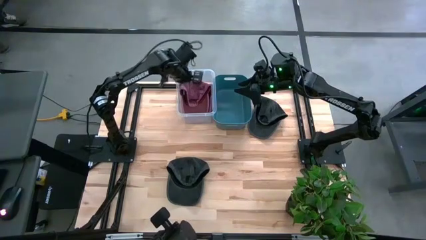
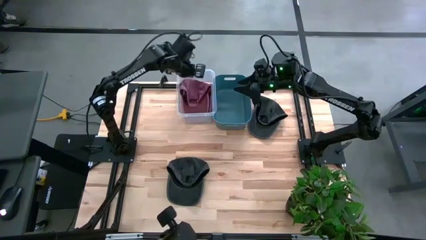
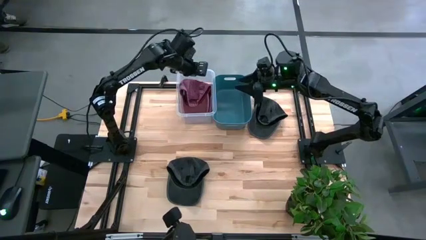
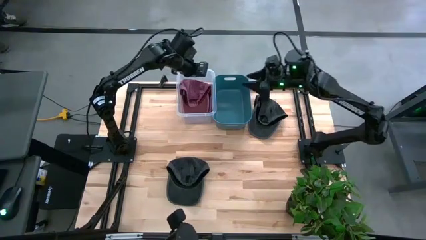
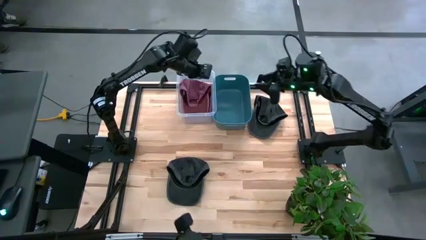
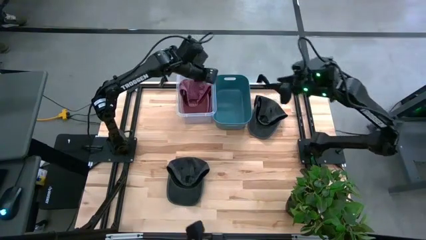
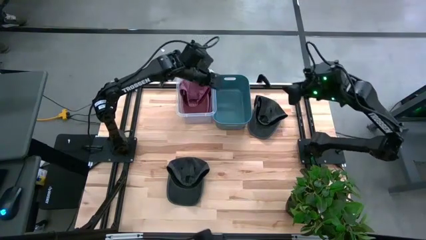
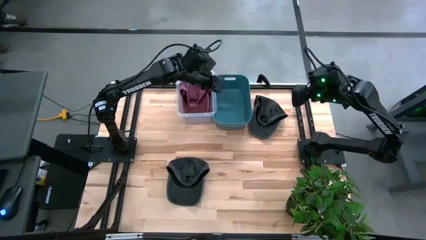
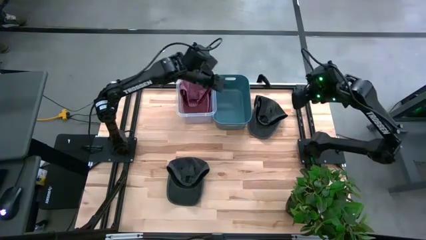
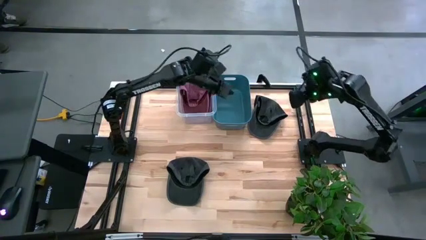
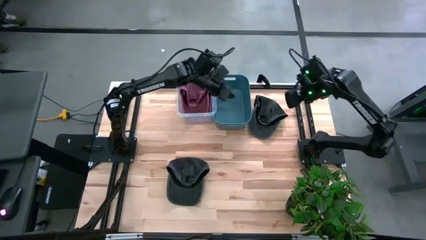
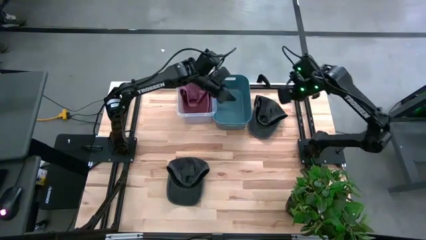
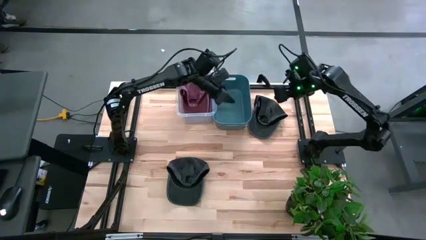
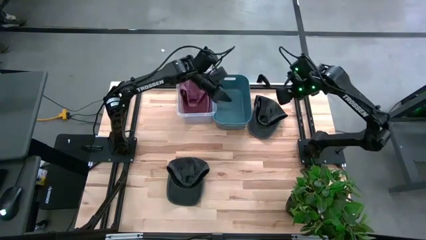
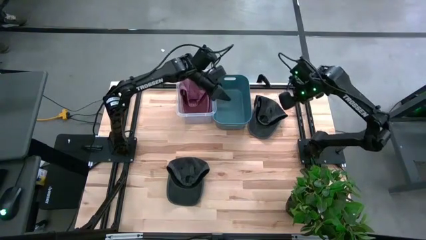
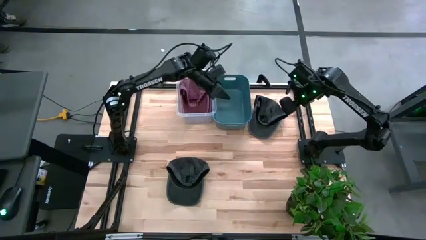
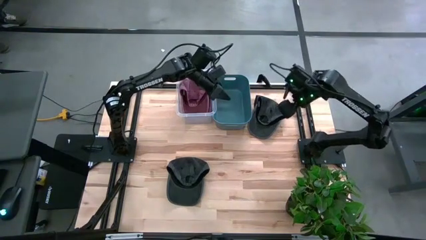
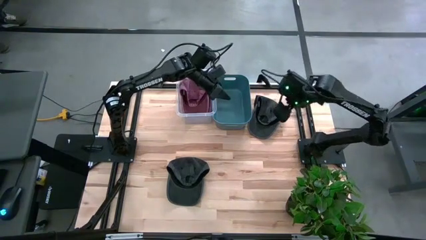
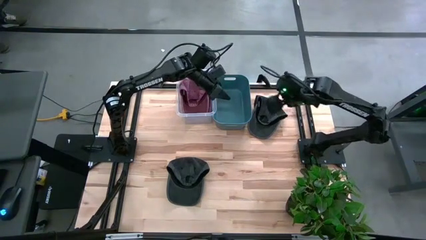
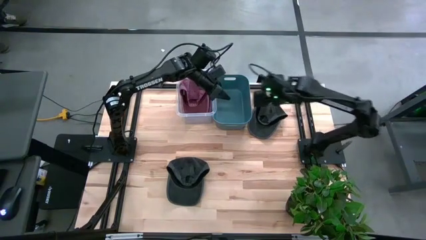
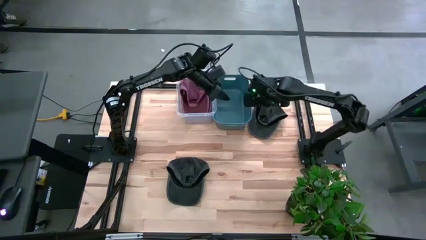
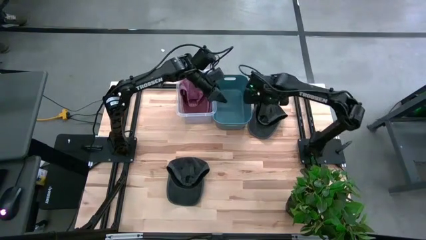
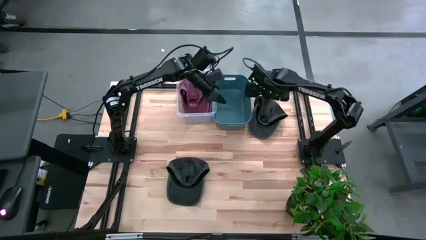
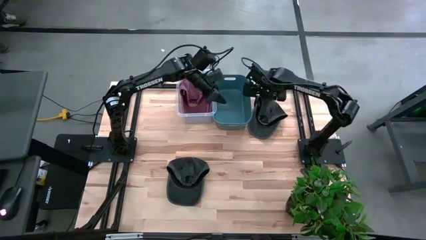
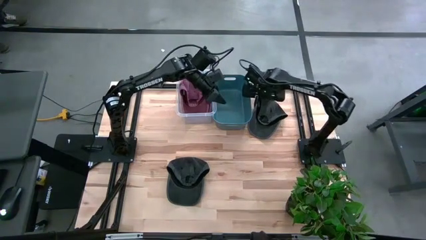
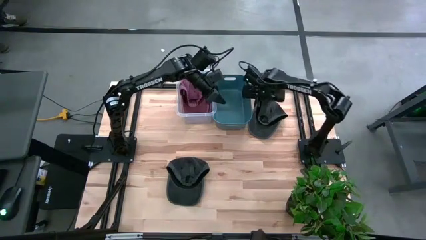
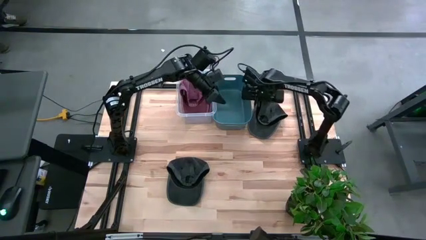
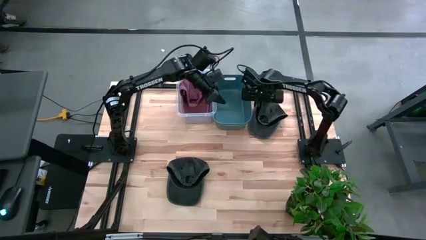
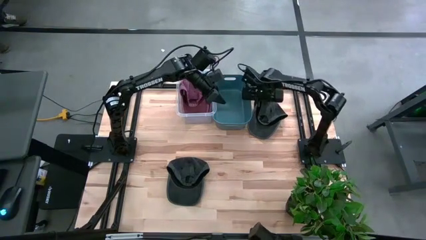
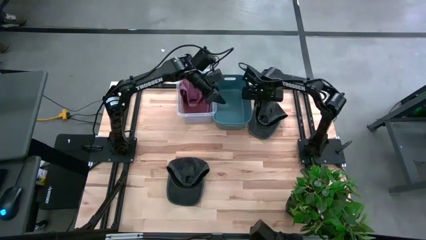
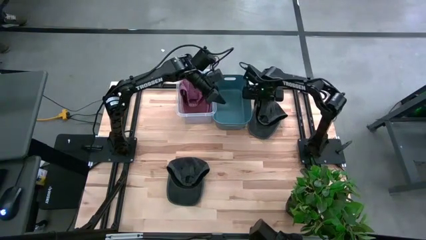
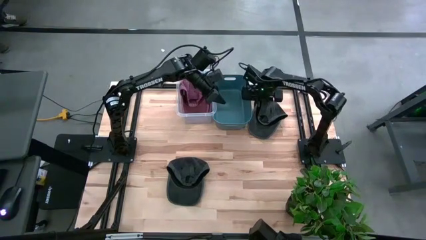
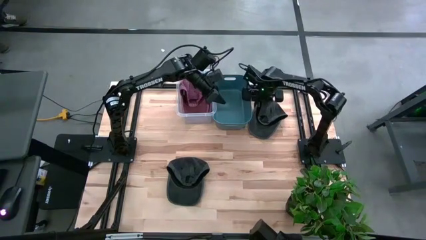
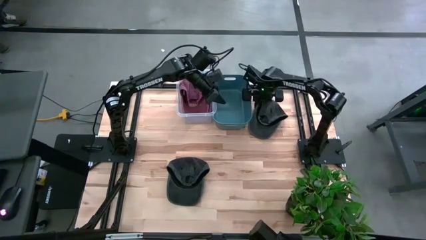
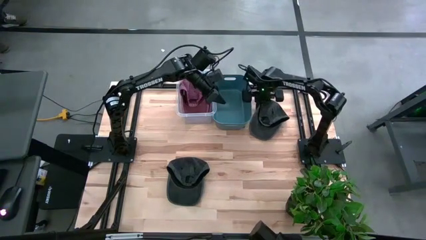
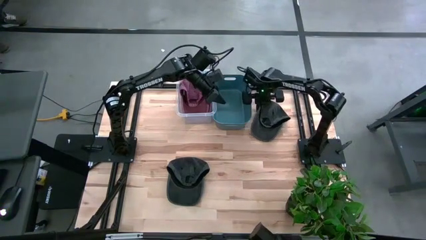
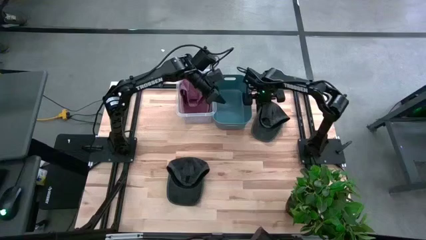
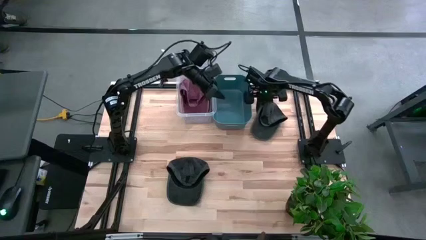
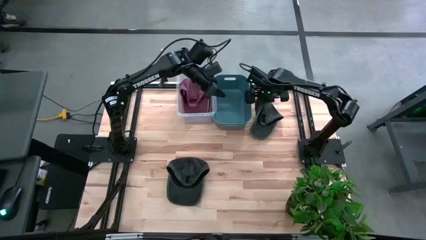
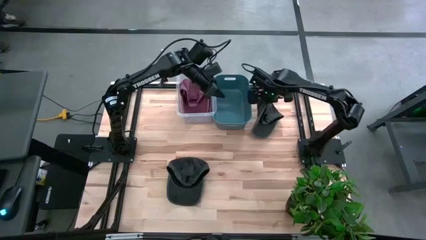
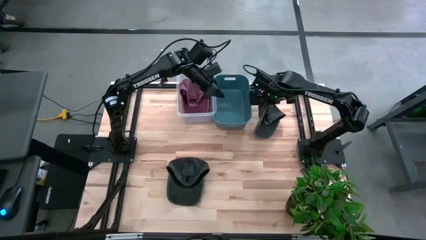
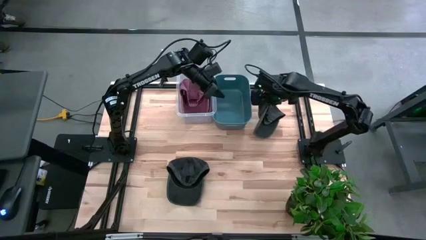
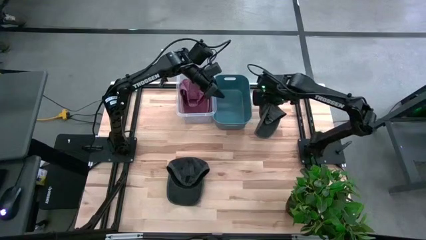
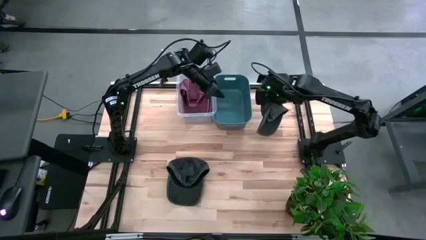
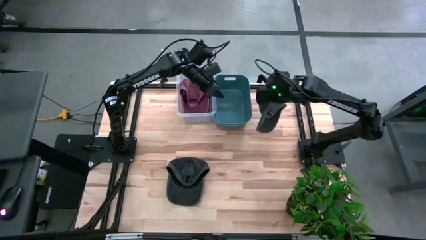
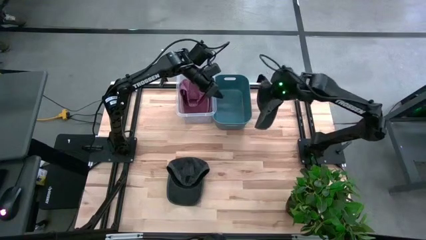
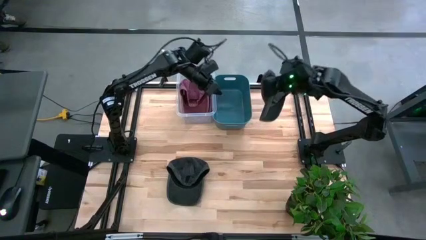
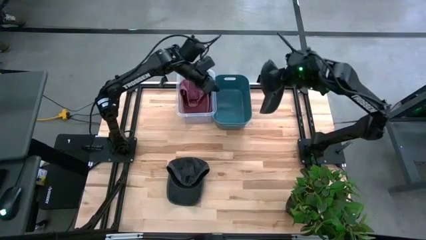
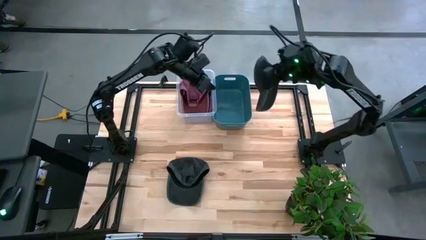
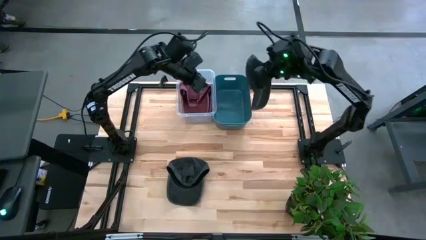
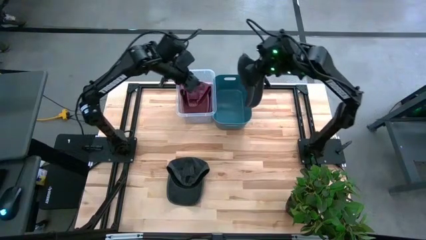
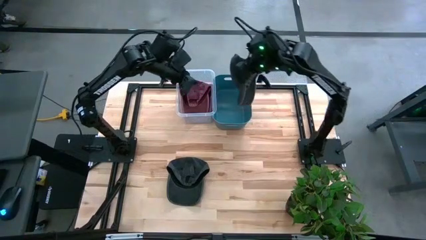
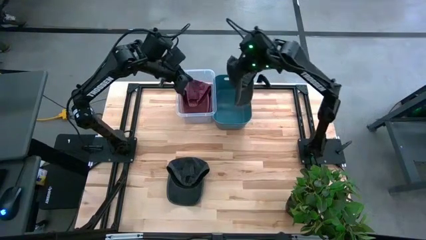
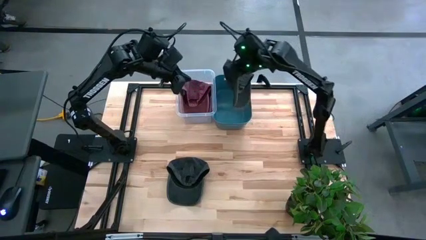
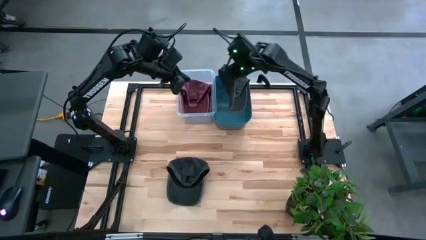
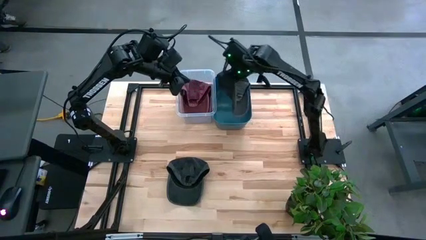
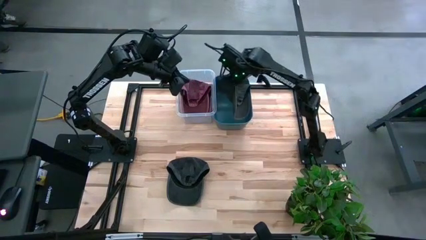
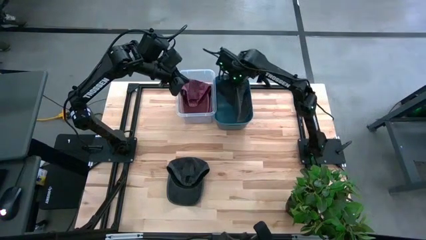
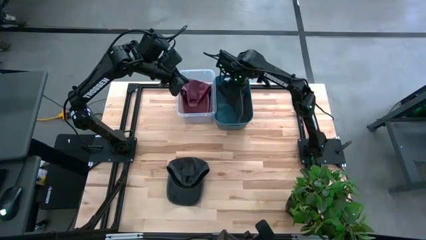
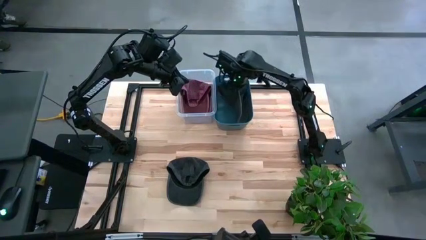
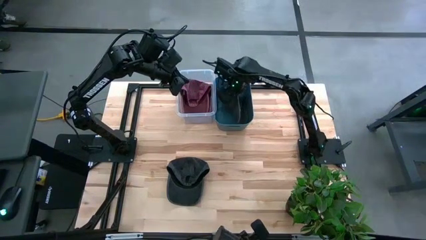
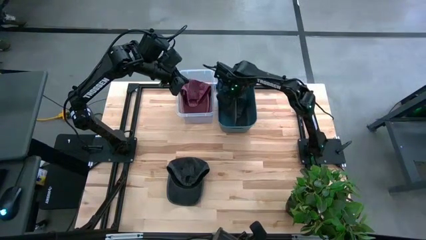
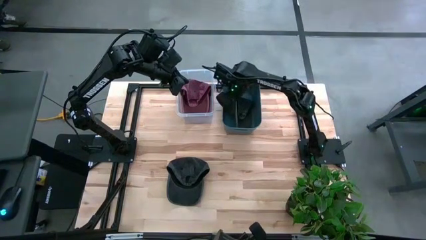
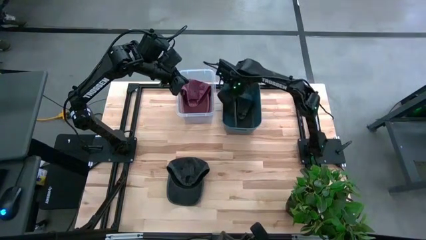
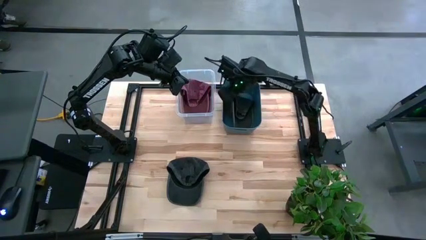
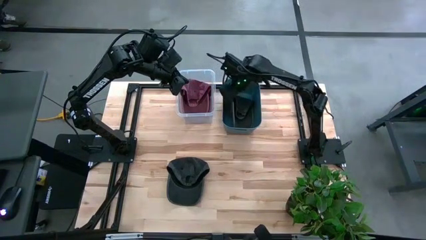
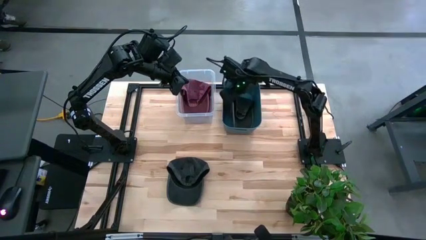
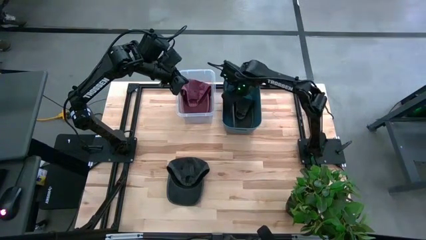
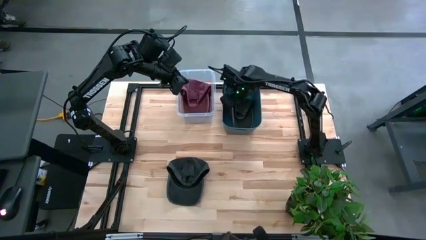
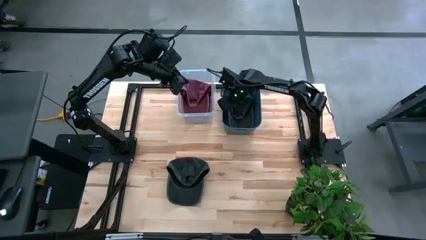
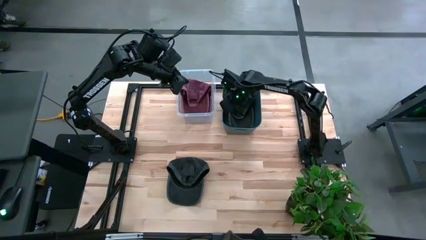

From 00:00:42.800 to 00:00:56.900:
Task: Pick & Place hat
Put the top right black cap into the green bin
